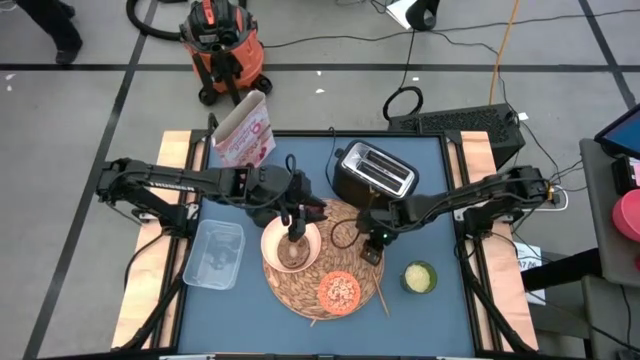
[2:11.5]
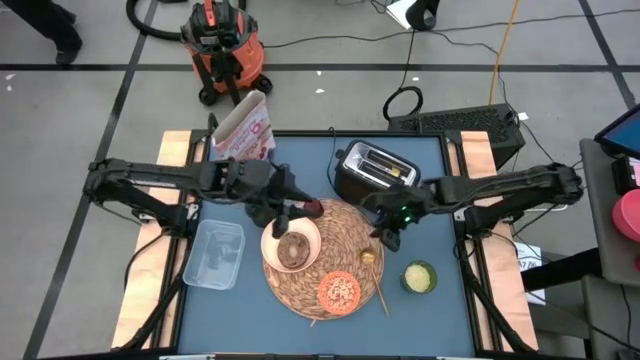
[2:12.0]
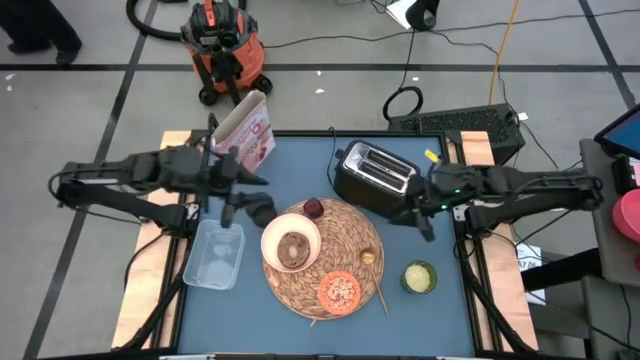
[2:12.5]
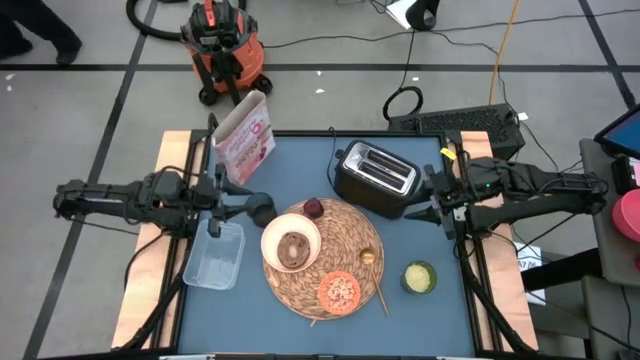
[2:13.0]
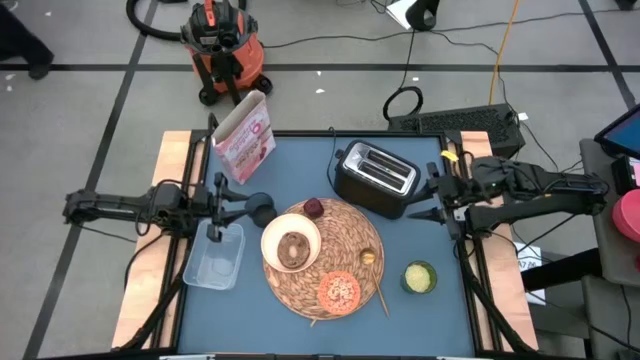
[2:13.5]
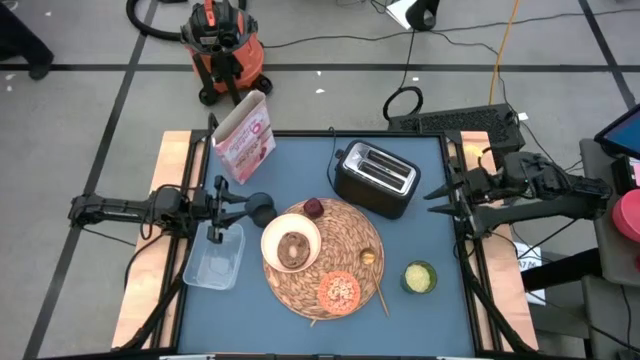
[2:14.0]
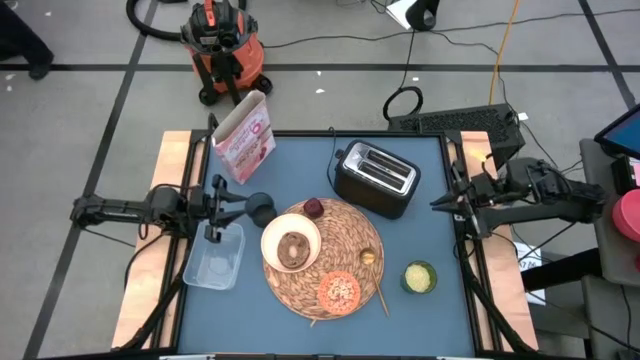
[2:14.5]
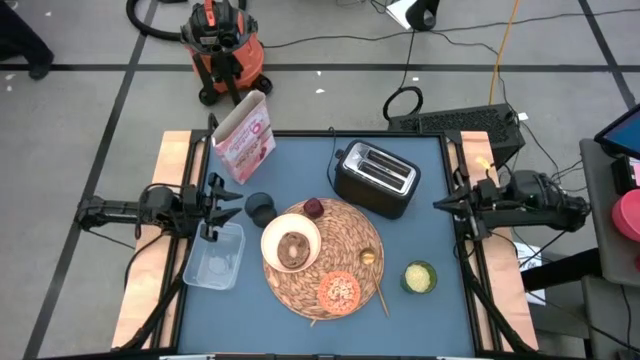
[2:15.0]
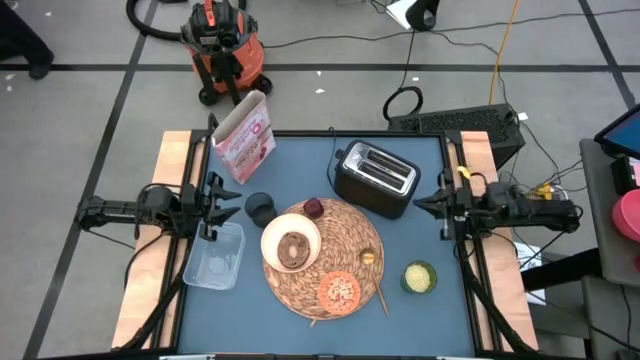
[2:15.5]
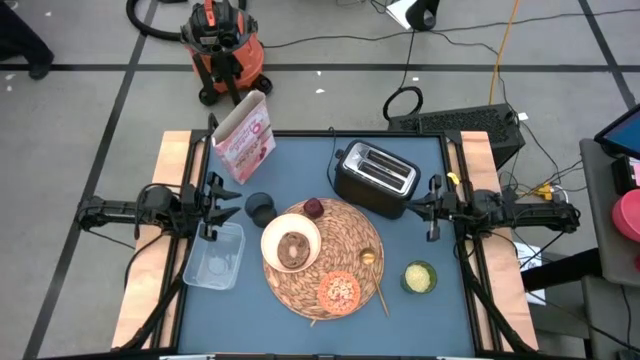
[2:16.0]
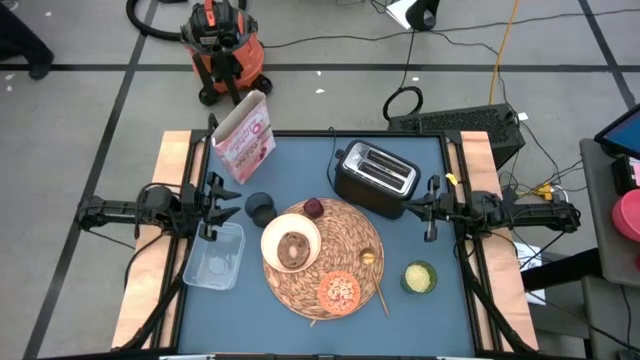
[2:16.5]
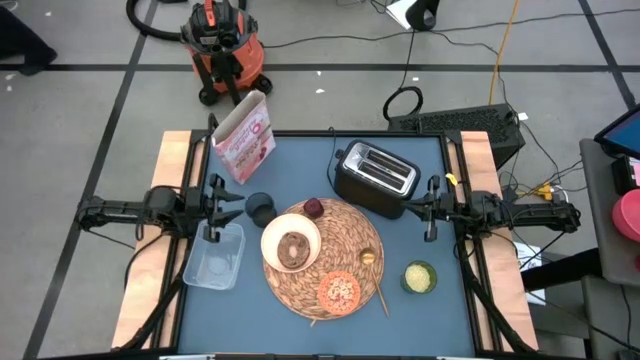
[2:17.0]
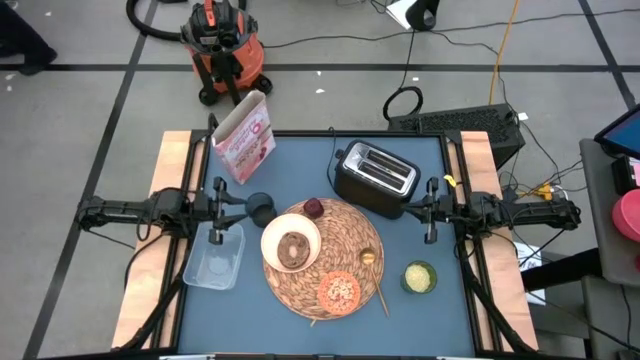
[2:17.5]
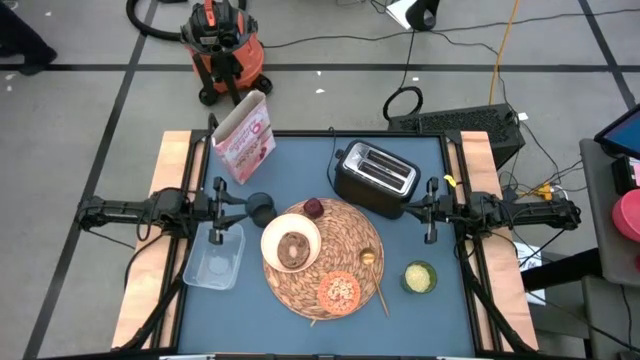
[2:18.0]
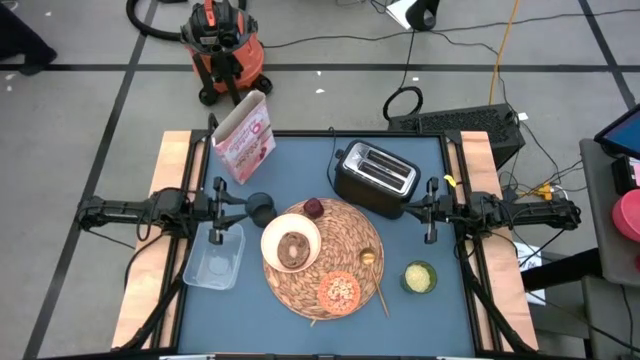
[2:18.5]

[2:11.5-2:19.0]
Task: Arrange a breakfast setting
Return to Home Position
